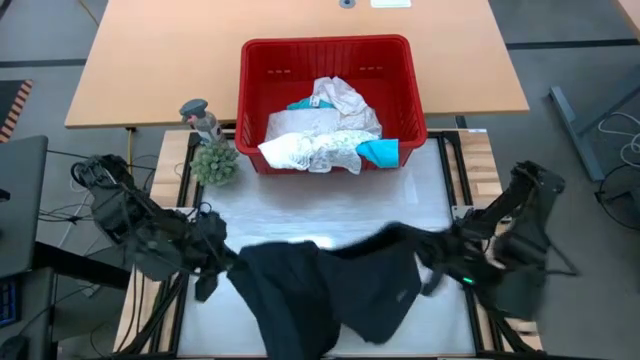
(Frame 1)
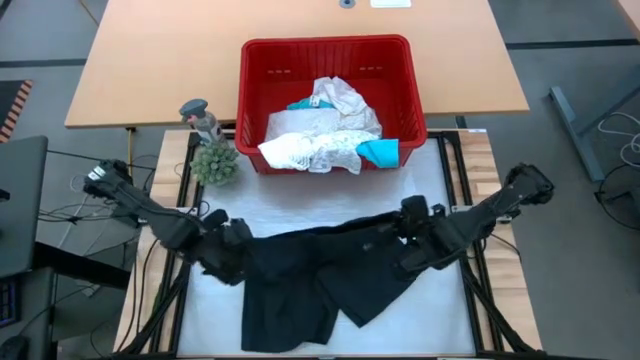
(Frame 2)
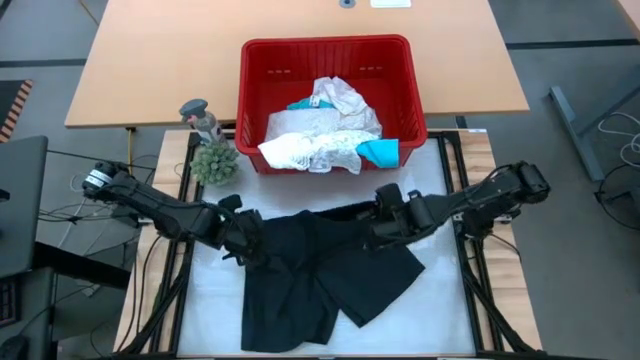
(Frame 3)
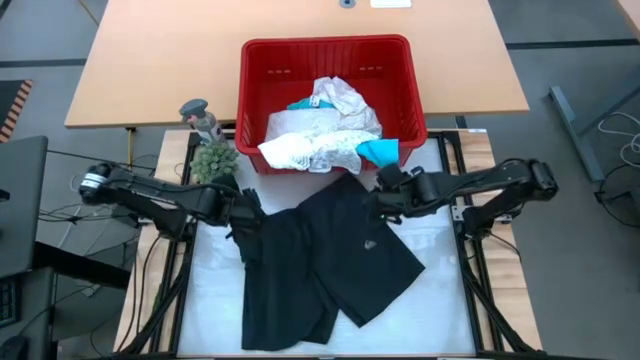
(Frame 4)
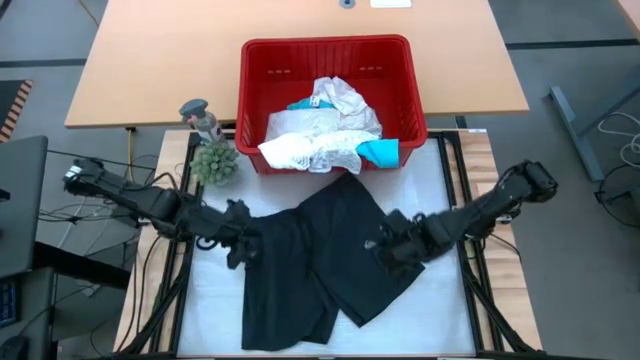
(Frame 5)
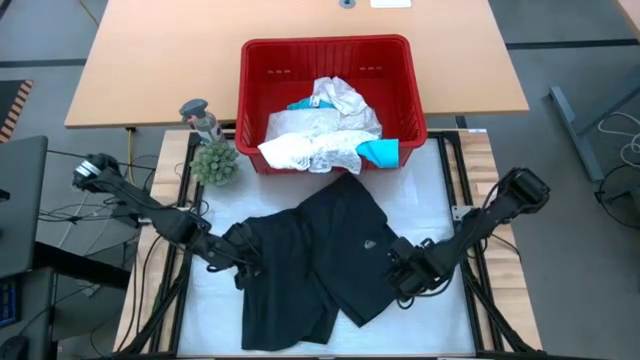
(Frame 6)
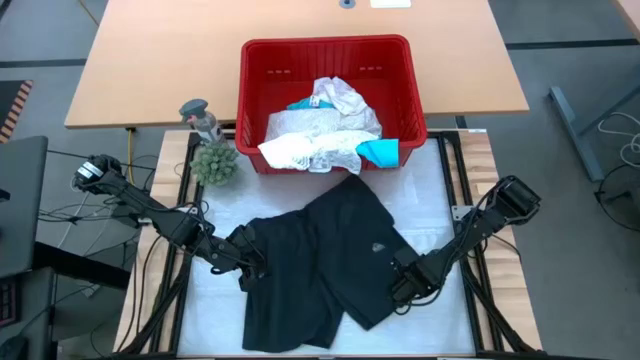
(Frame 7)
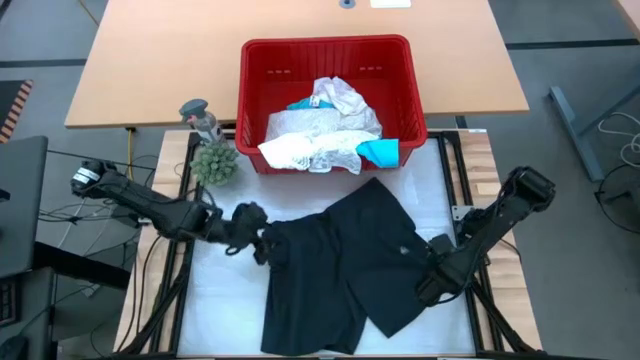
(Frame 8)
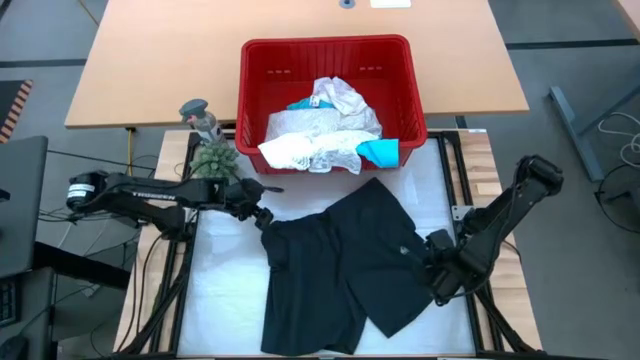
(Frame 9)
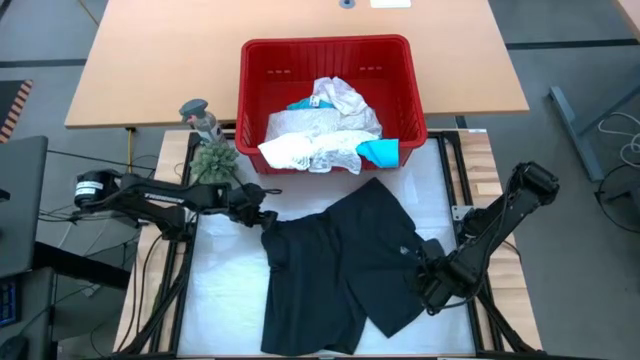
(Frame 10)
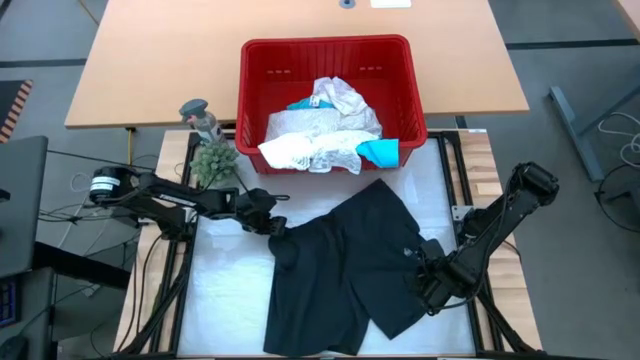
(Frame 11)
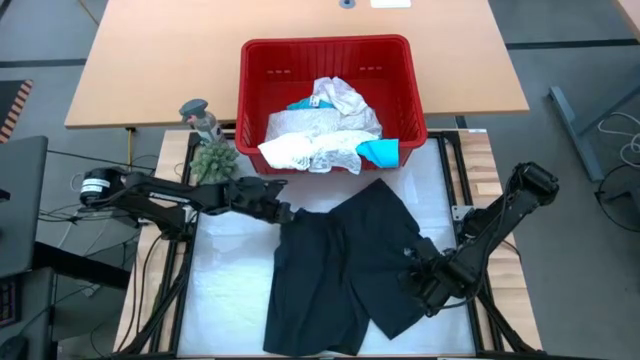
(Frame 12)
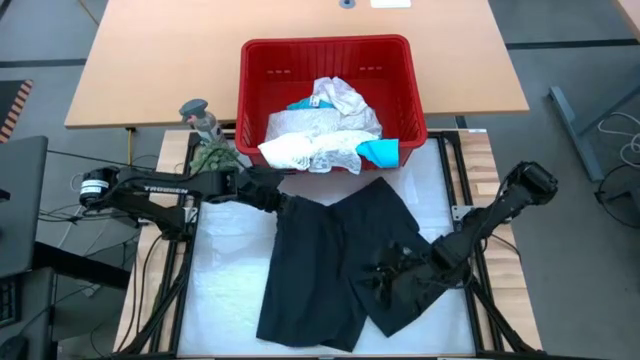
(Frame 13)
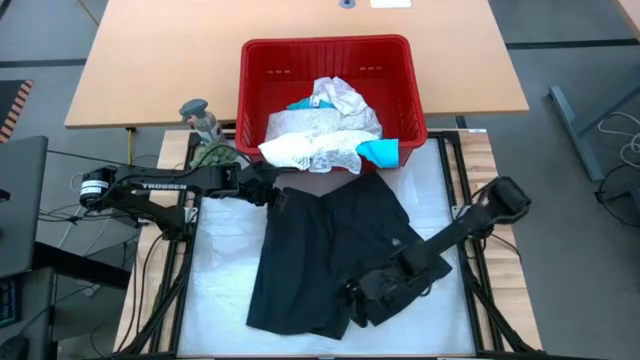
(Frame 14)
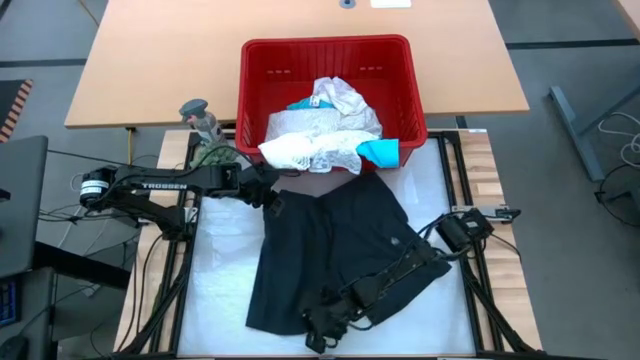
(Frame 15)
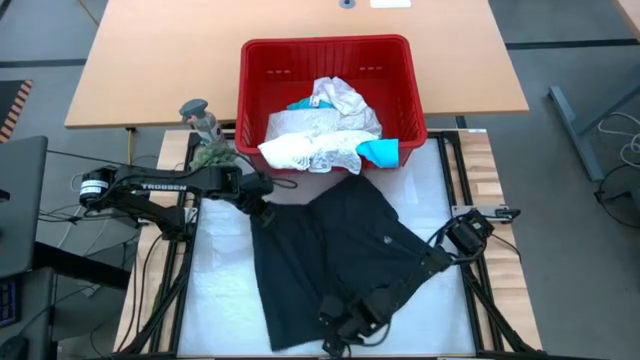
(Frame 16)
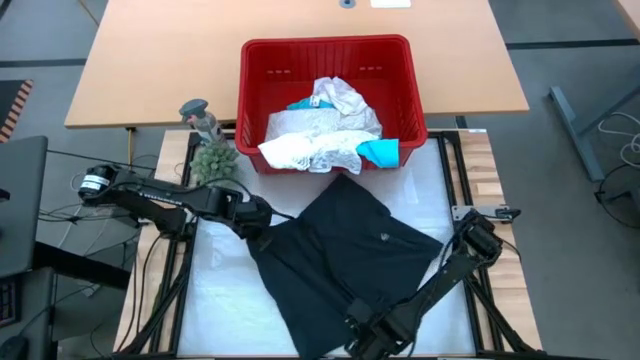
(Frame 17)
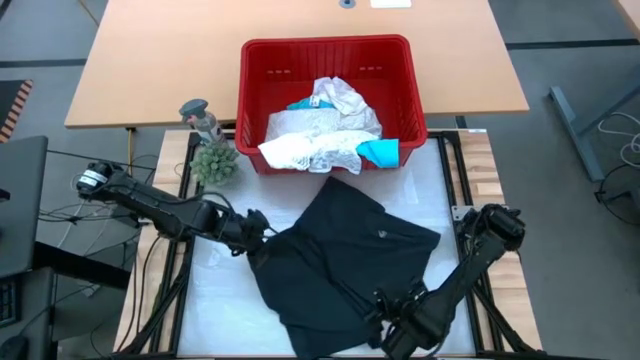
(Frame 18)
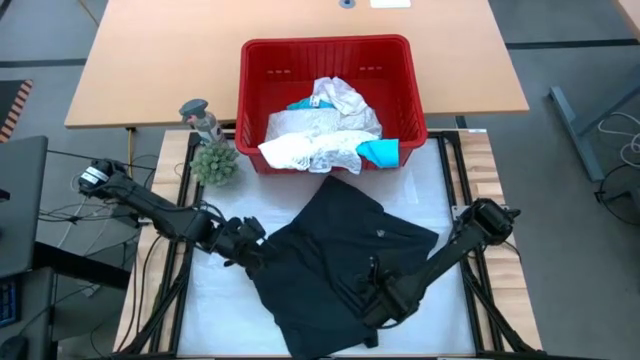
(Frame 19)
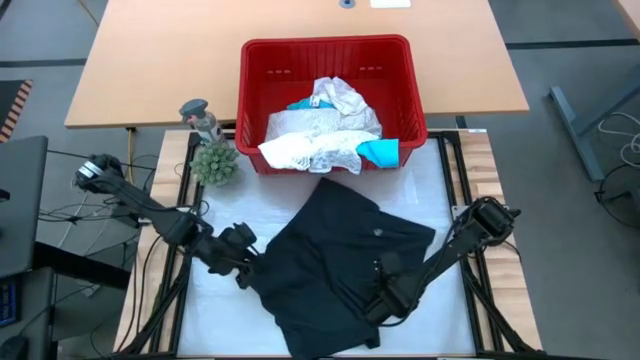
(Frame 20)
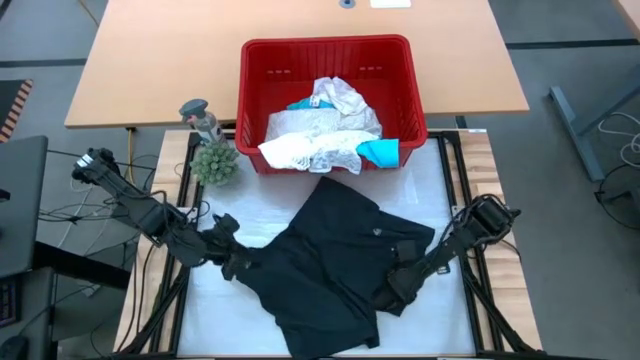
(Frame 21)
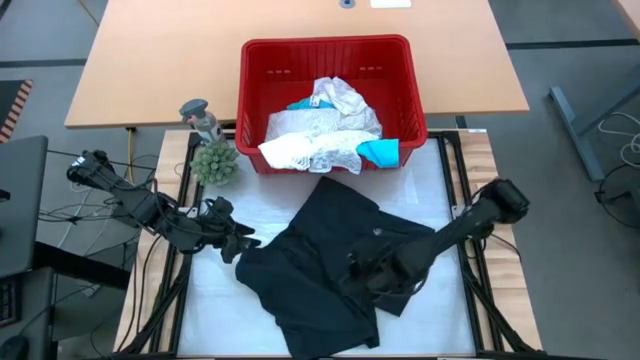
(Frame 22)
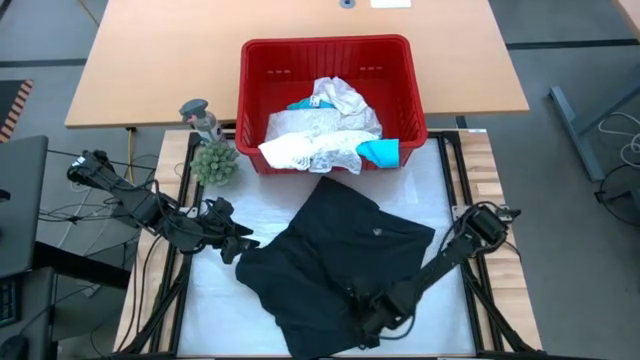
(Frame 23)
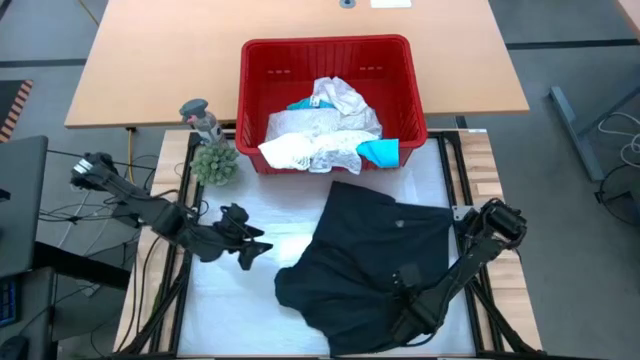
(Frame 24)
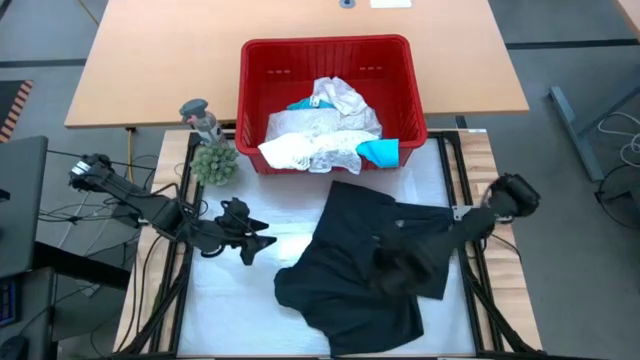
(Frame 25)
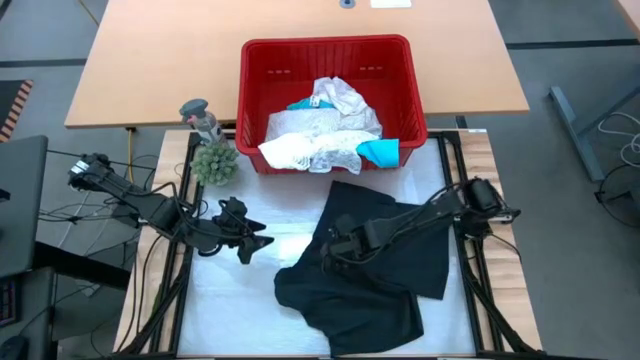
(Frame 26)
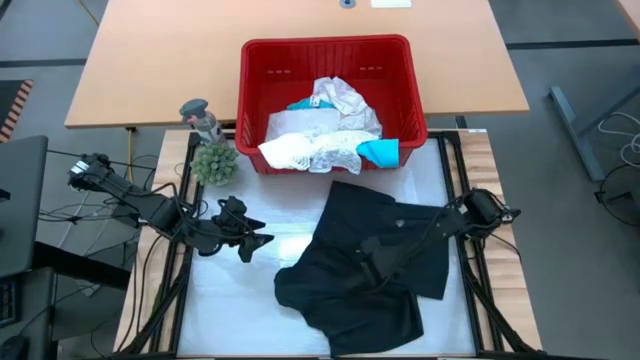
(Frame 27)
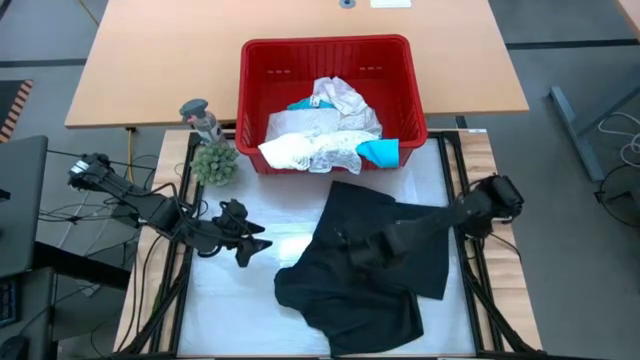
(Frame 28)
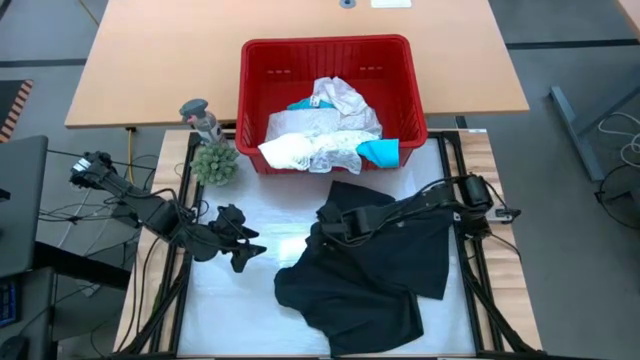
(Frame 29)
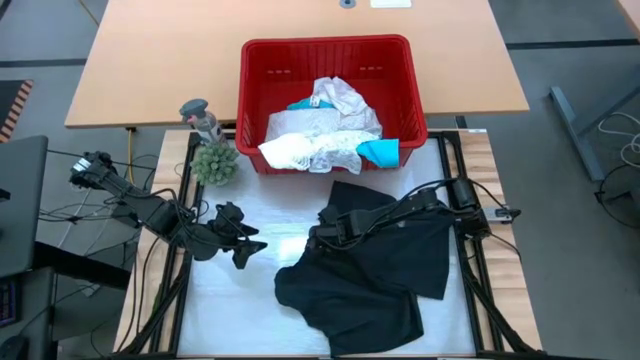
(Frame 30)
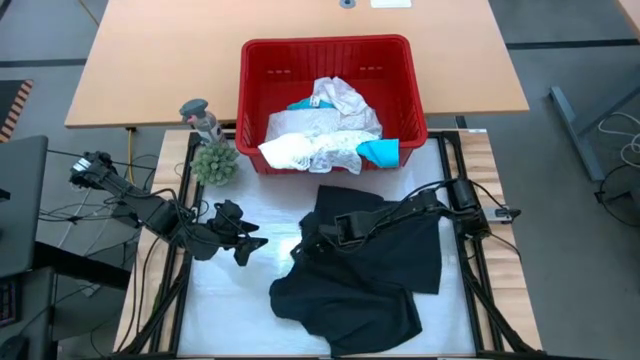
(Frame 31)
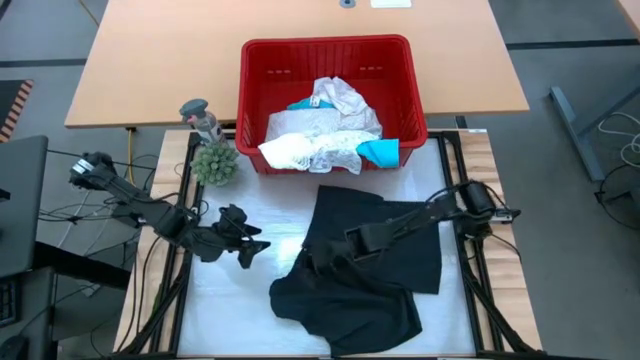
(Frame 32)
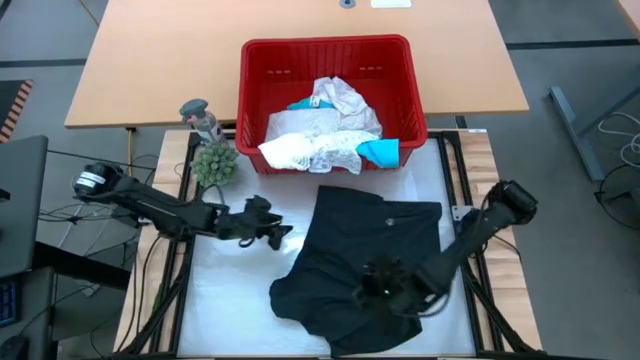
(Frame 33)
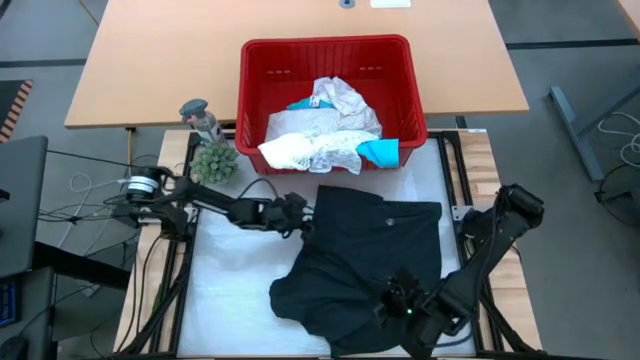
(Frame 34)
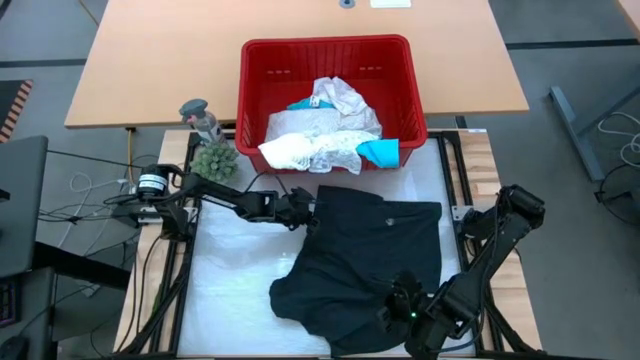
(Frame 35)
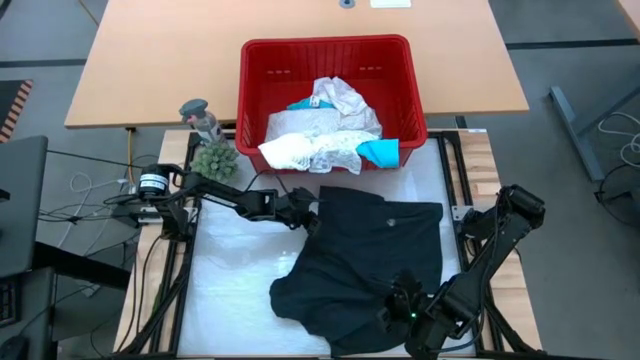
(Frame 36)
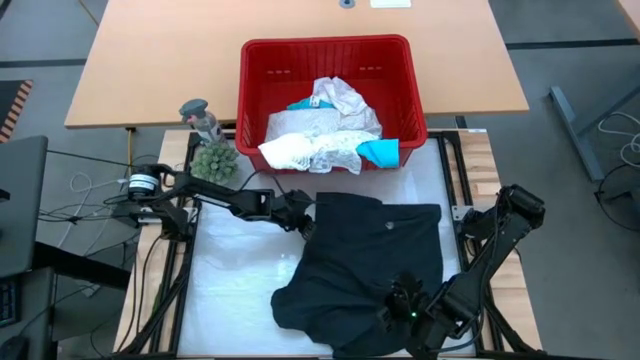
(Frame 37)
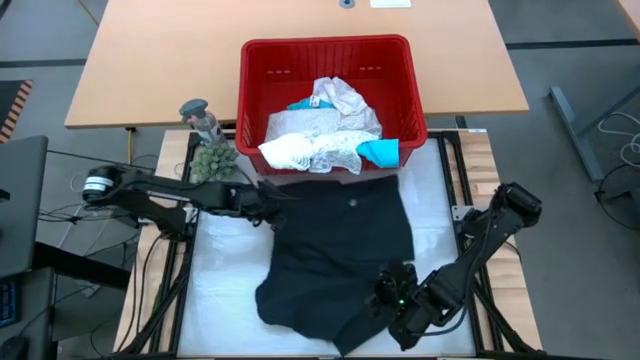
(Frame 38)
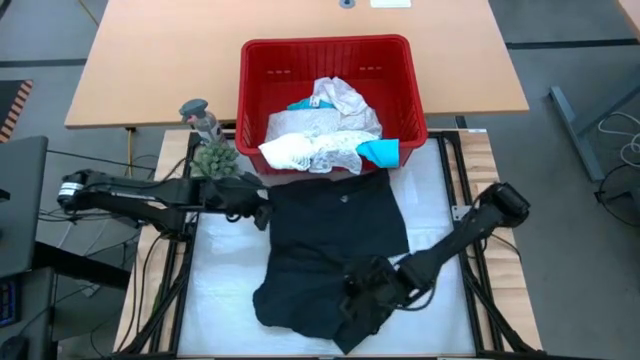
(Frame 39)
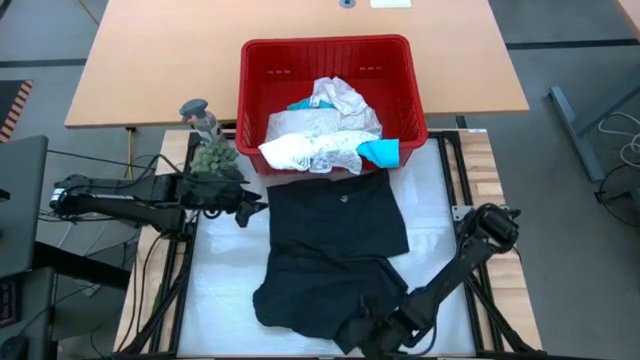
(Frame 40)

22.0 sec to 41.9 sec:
Task: Fold Laundry from Bin
Fold the black shorts
